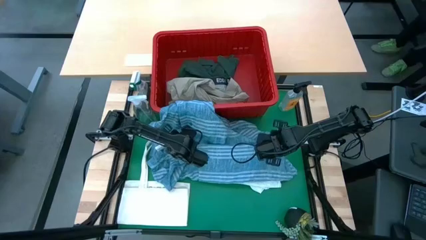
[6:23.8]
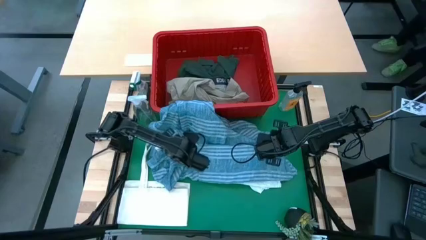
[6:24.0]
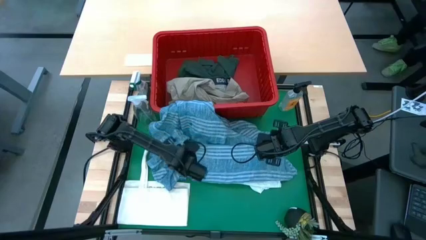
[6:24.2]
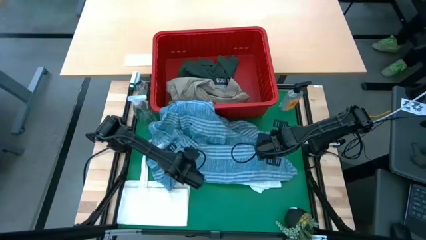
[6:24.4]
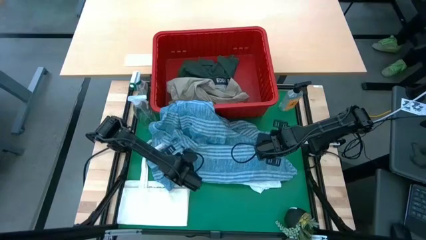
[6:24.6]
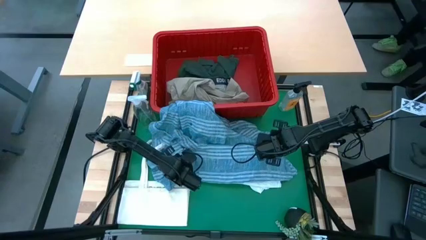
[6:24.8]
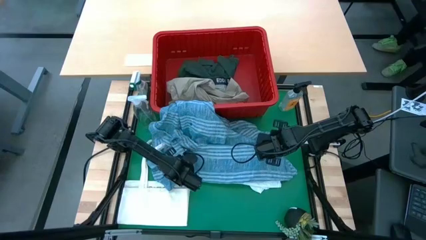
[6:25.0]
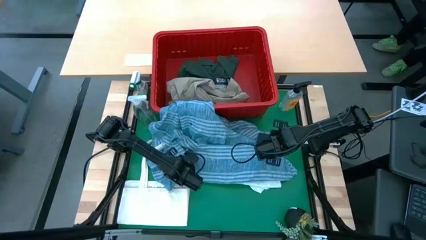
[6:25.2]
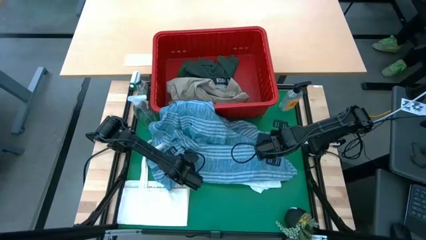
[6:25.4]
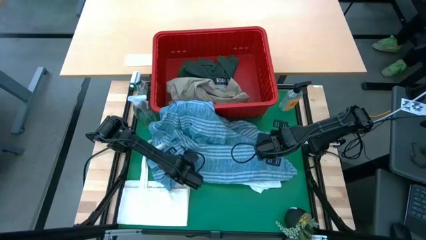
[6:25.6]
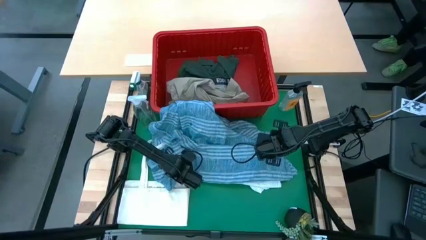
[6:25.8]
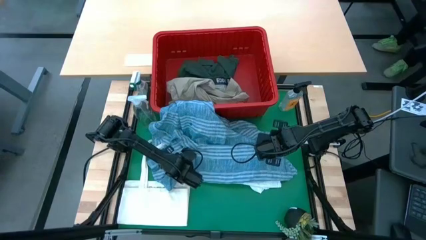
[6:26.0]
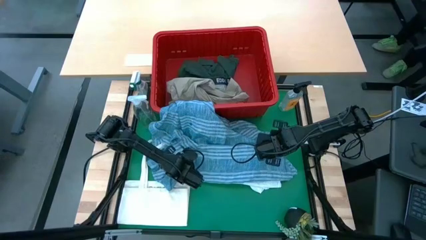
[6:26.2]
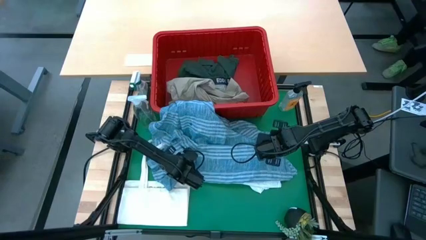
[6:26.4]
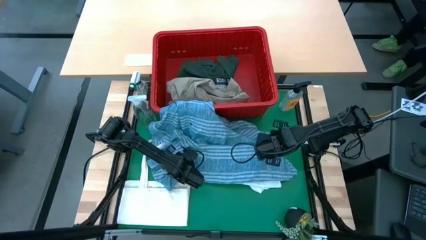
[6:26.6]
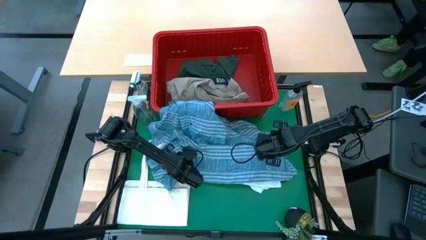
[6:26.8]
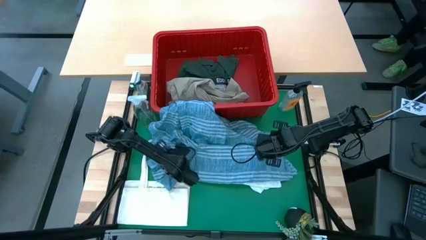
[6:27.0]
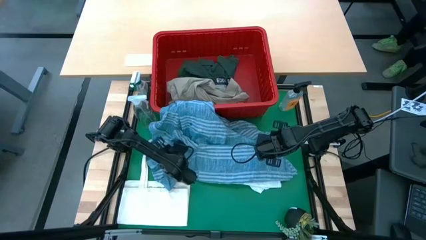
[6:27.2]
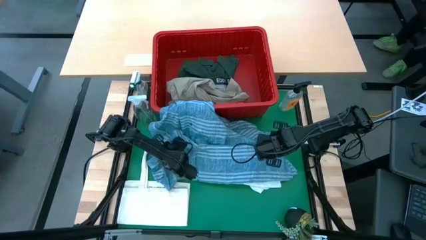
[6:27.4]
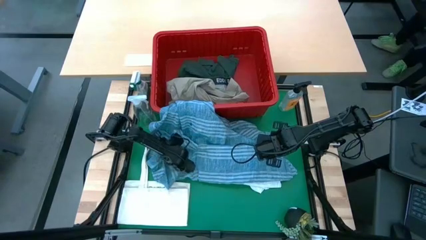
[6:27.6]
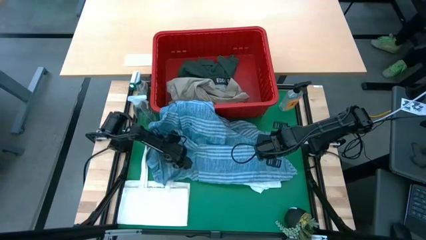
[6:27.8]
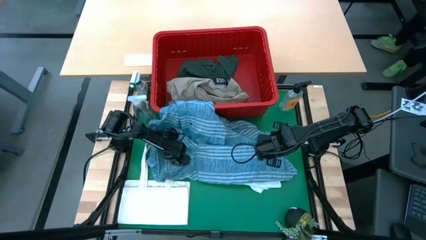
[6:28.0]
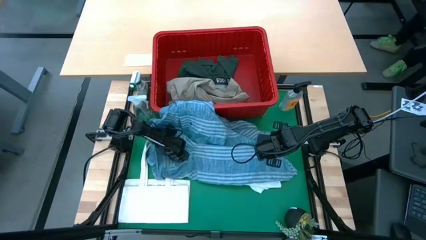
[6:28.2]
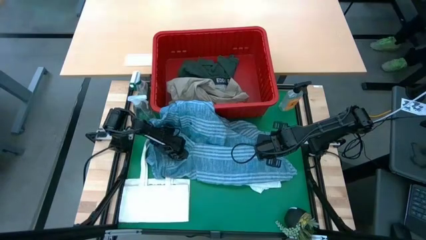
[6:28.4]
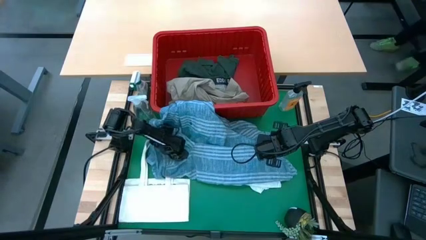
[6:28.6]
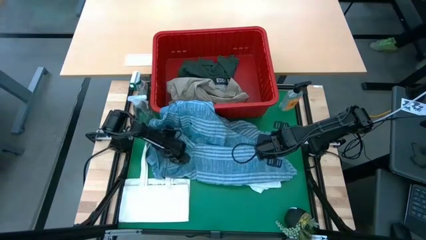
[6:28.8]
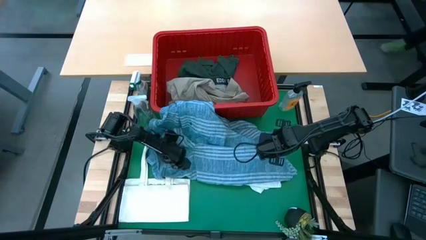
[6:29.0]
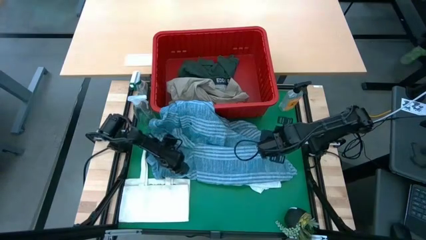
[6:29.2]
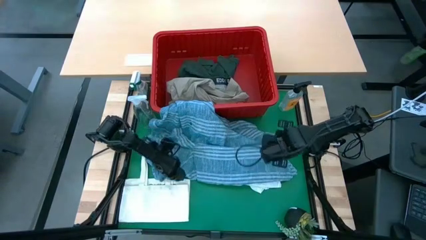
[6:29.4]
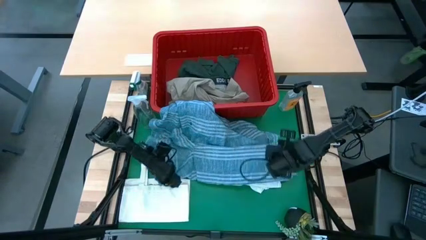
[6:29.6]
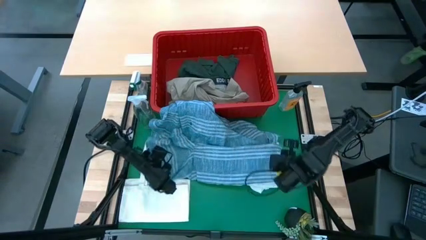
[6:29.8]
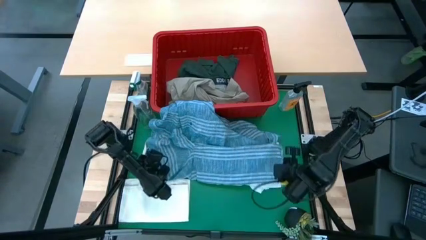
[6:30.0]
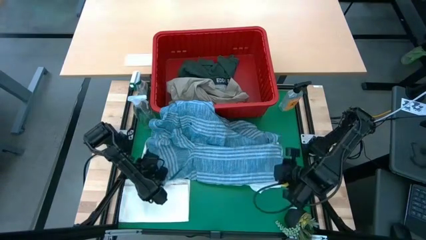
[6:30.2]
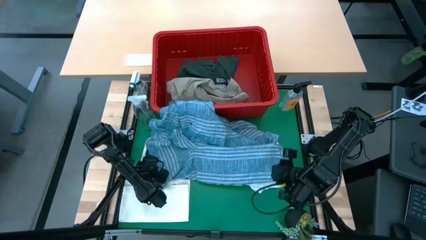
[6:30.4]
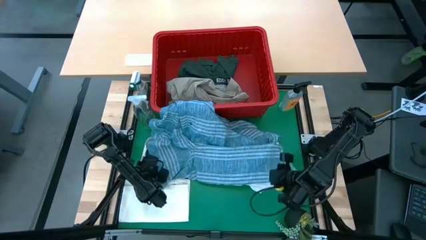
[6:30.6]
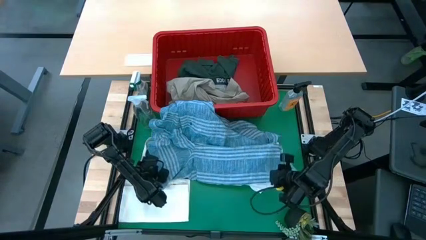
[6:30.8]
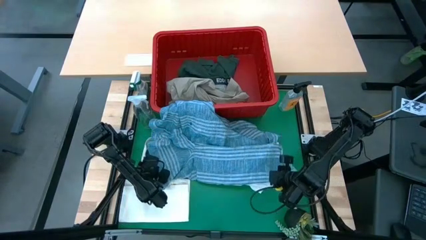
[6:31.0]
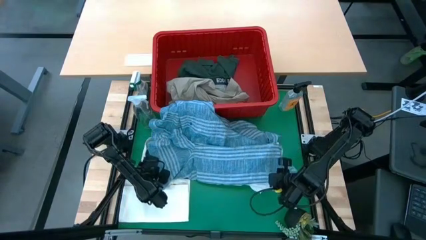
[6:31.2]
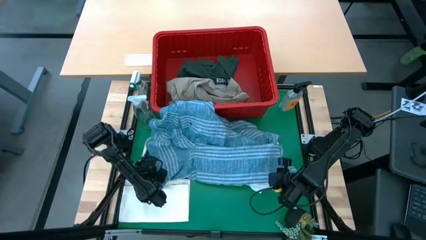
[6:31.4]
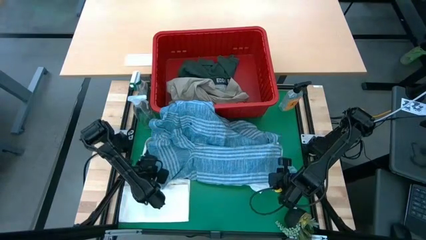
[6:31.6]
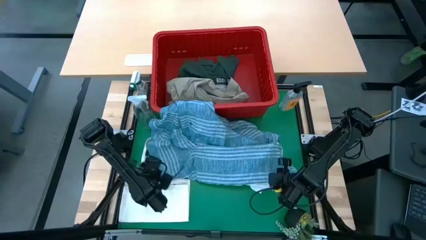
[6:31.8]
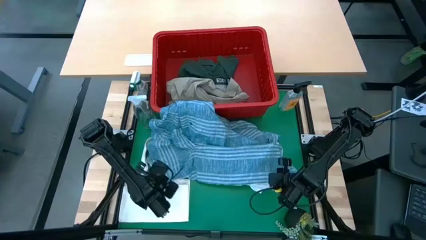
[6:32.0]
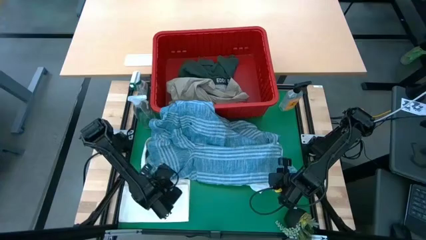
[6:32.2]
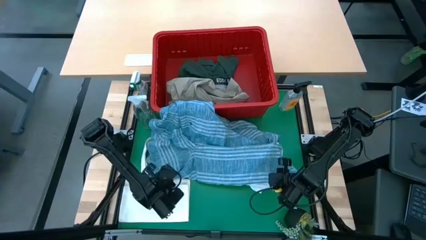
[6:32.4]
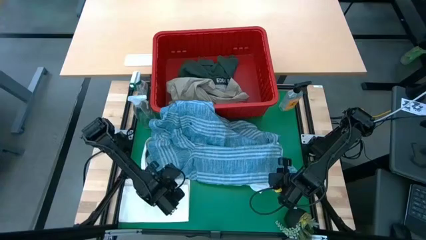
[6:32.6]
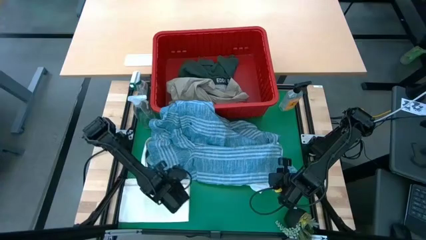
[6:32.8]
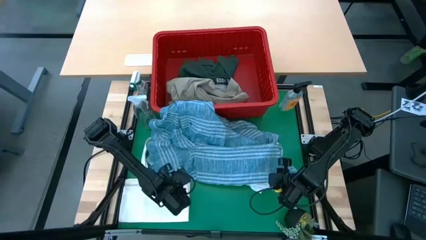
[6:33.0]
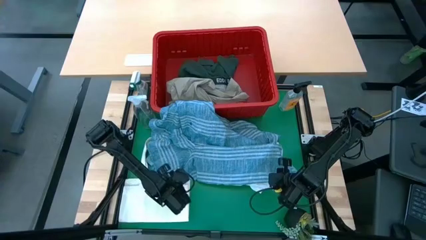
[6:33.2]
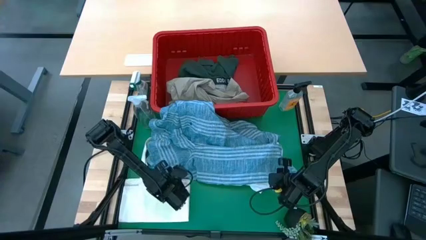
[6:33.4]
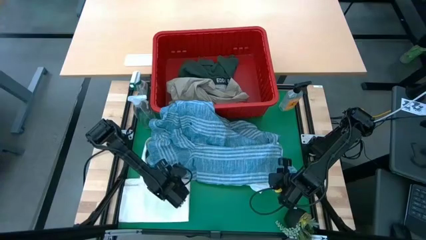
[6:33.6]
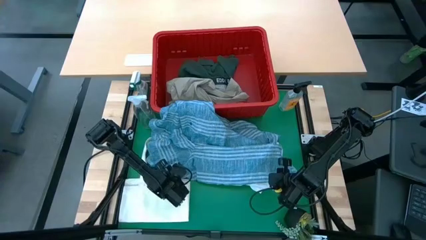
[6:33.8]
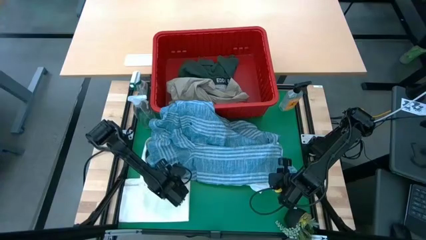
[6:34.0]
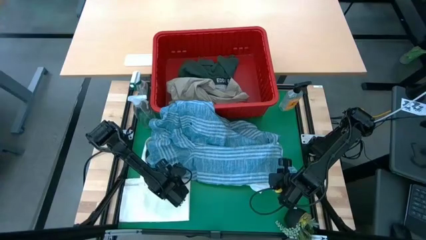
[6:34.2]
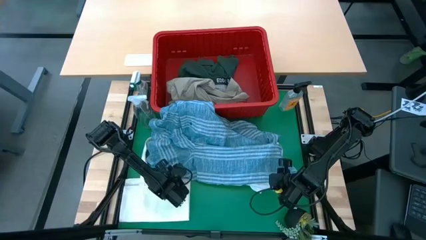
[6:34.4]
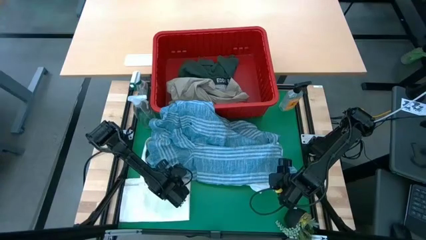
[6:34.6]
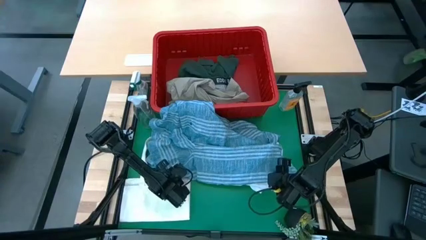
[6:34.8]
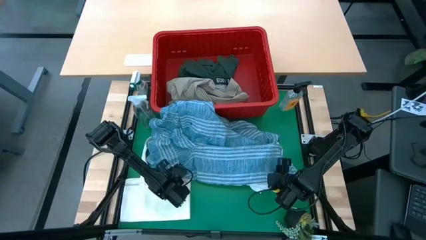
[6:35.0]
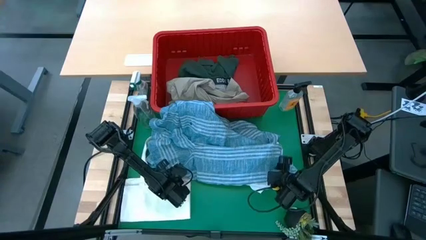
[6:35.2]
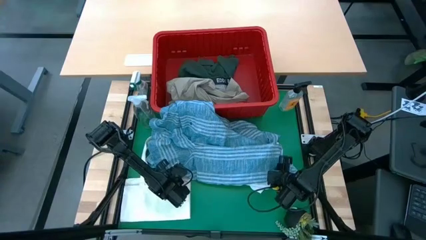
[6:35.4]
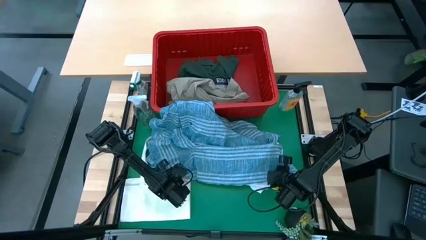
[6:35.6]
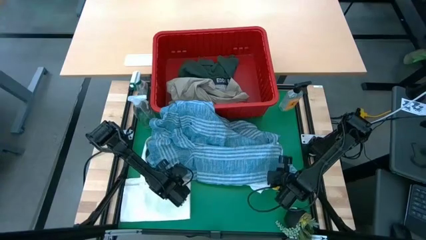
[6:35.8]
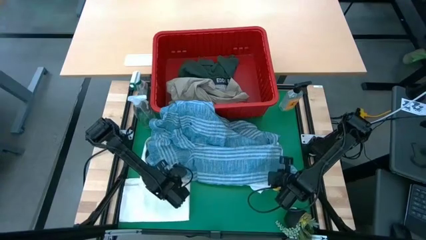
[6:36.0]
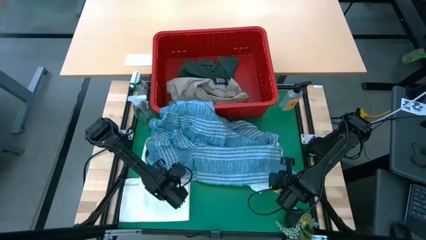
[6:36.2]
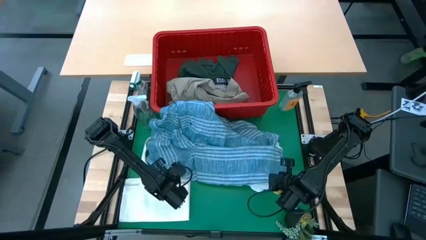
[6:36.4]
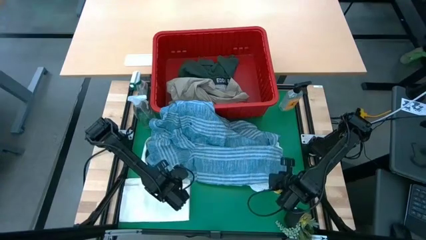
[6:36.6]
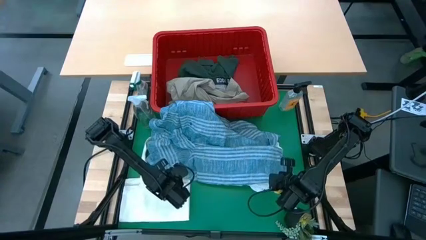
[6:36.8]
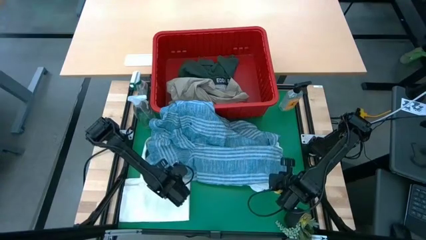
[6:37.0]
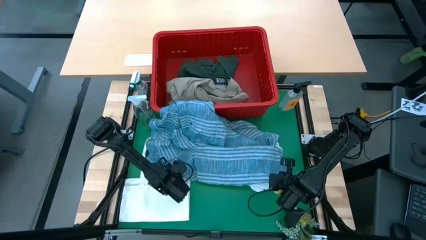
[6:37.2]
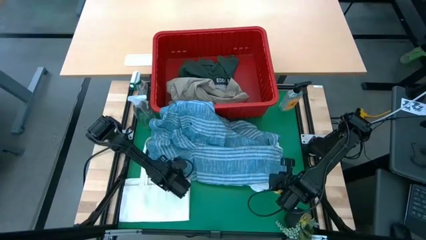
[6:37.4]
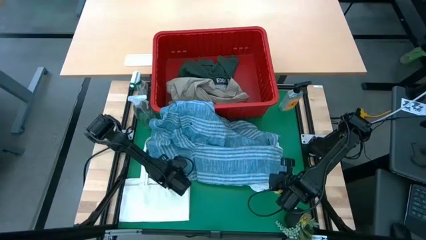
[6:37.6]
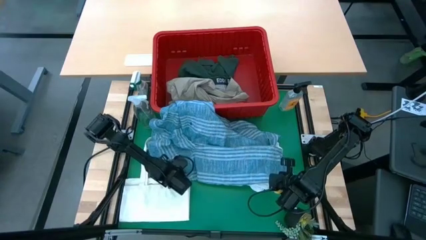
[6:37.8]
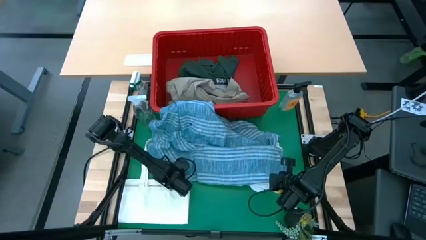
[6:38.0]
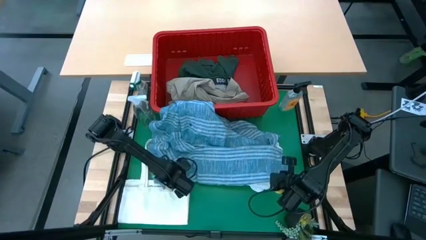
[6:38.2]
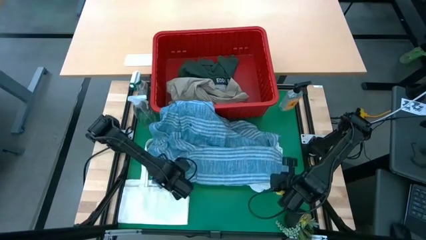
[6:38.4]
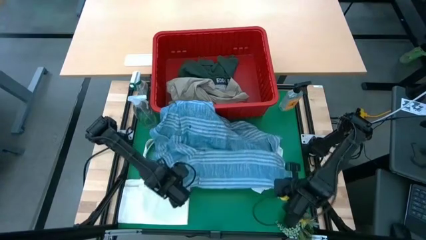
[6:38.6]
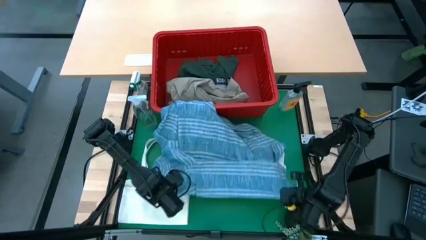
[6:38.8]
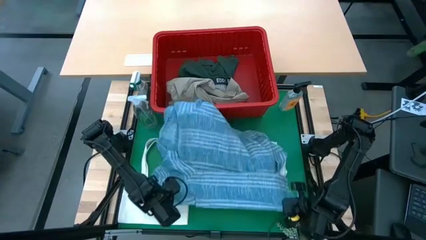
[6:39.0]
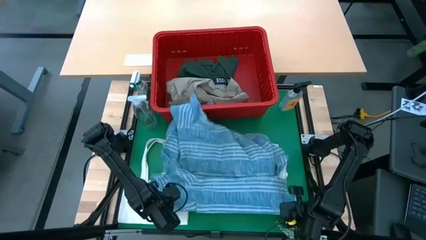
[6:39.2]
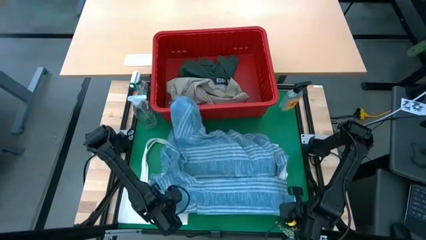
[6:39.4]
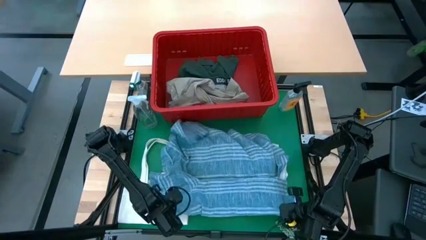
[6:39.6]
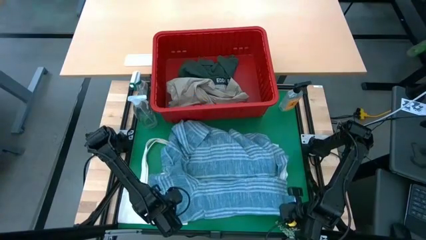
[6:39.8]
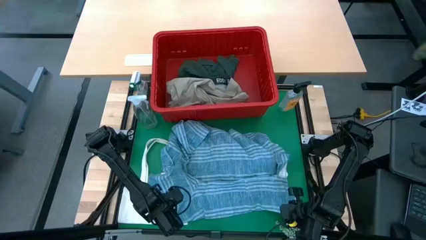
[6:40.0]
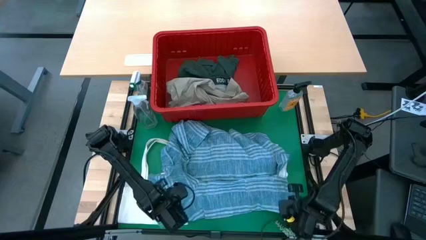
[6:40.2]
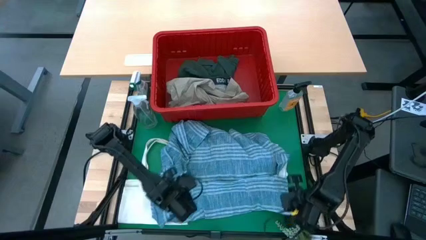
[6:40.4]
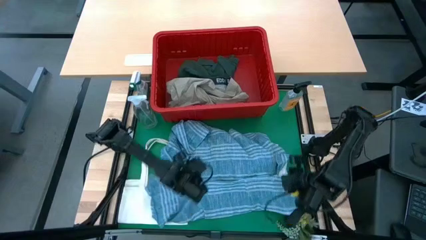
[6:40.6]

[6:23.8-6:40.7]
Task: Fold Laundry from Bin
Fold the blue checkered polo shirt
